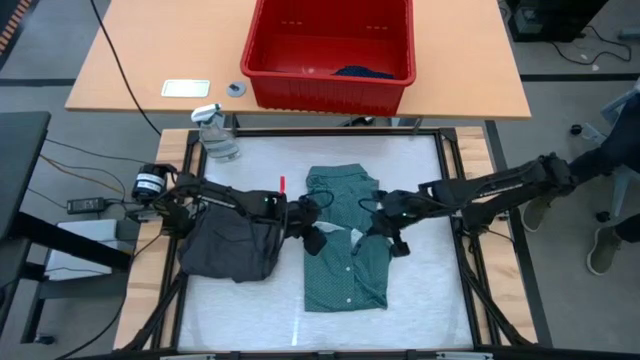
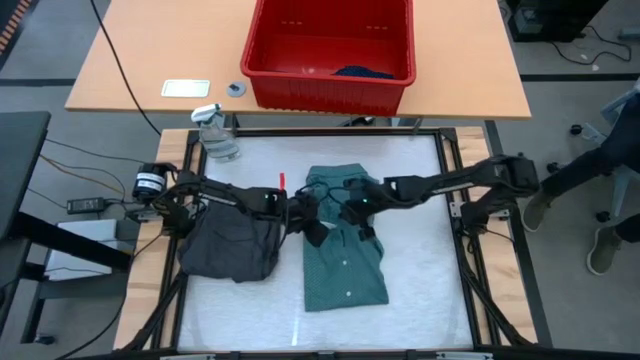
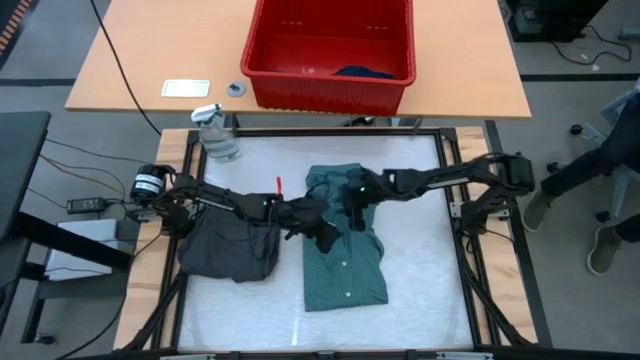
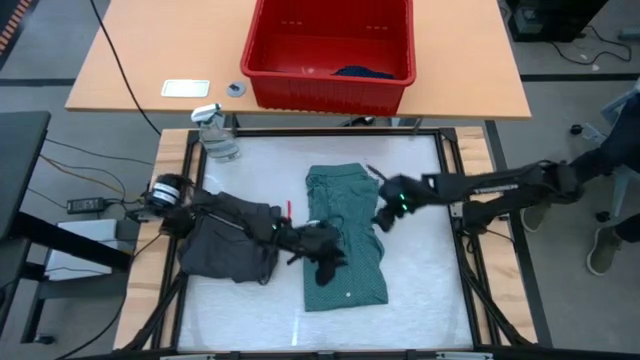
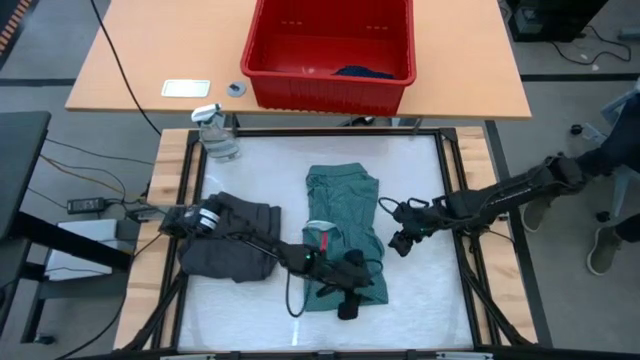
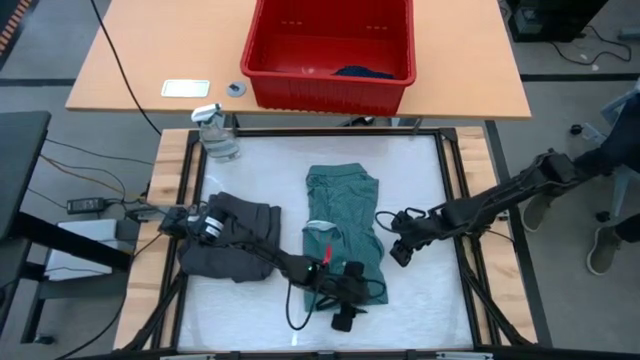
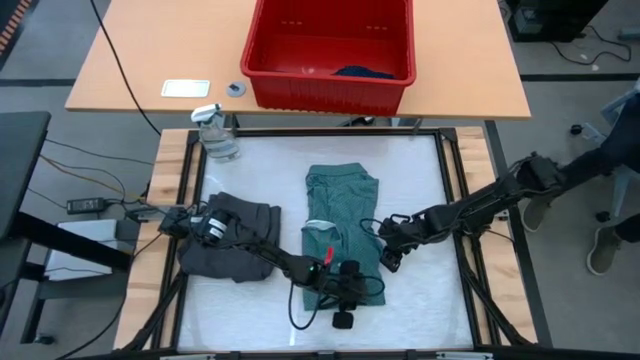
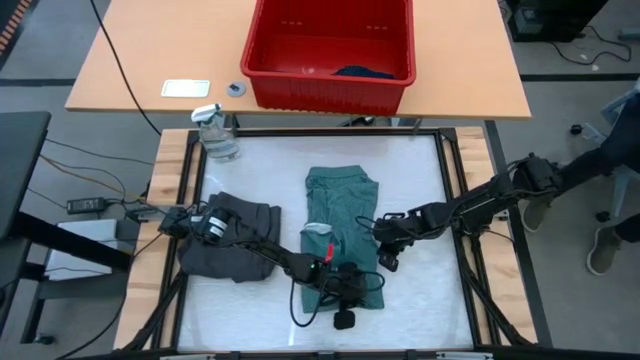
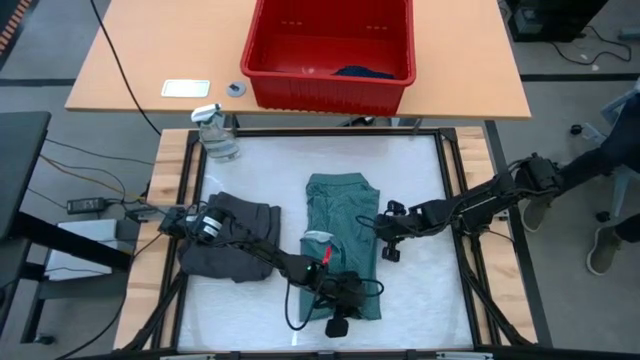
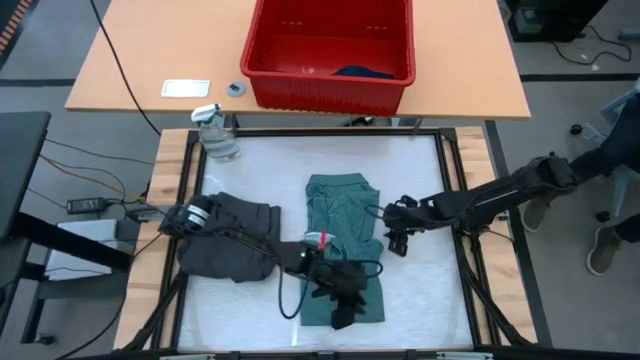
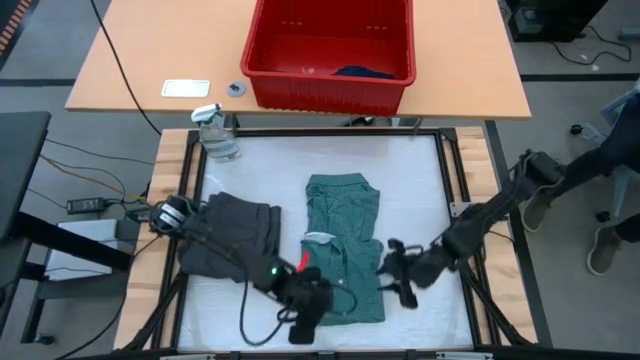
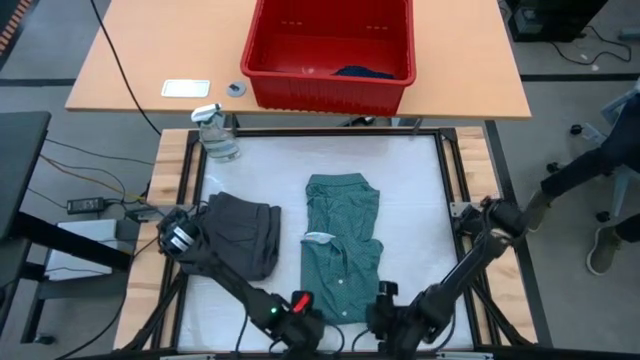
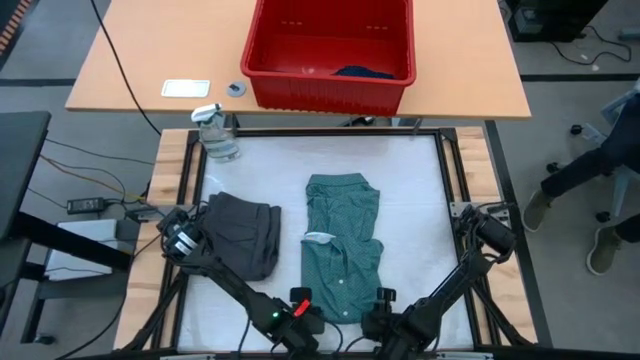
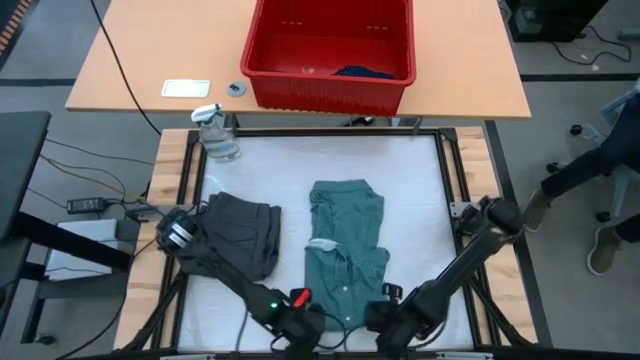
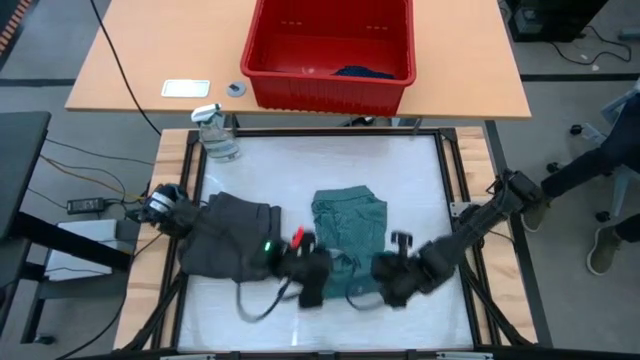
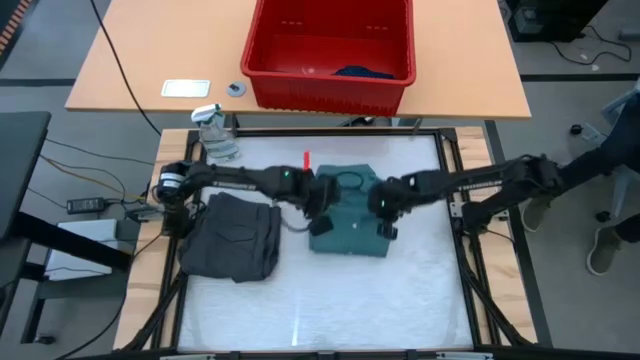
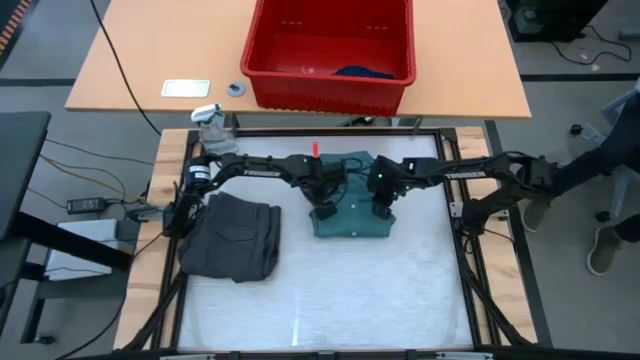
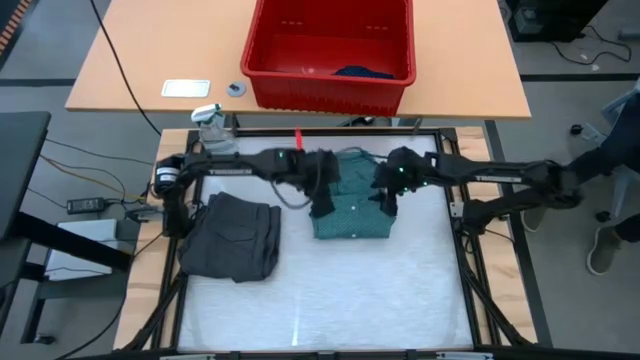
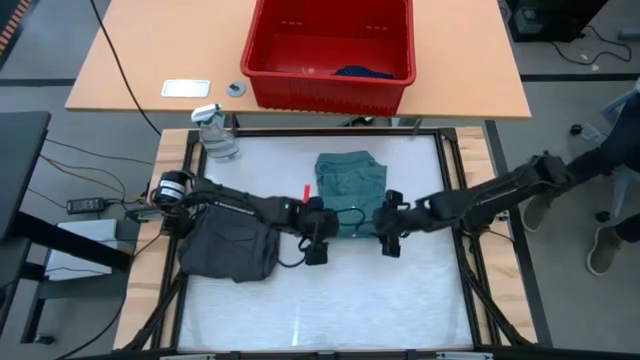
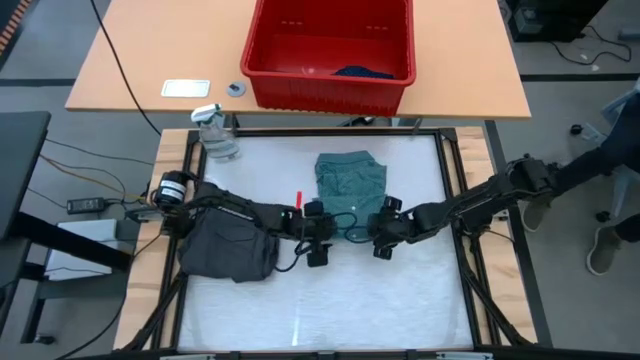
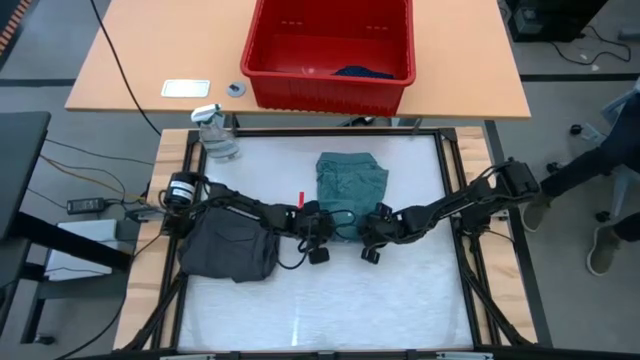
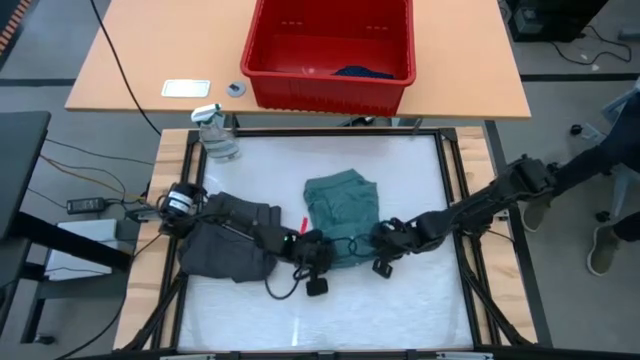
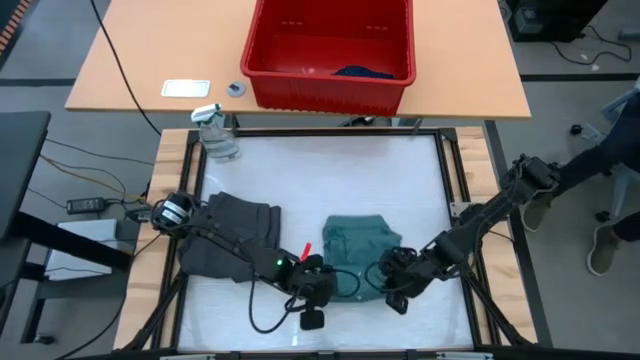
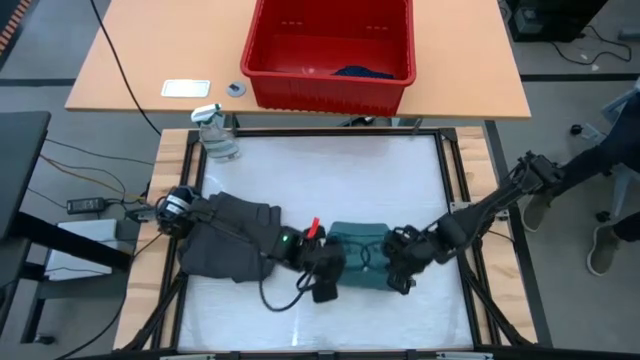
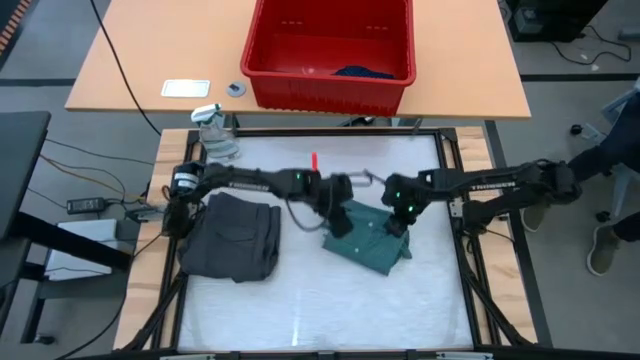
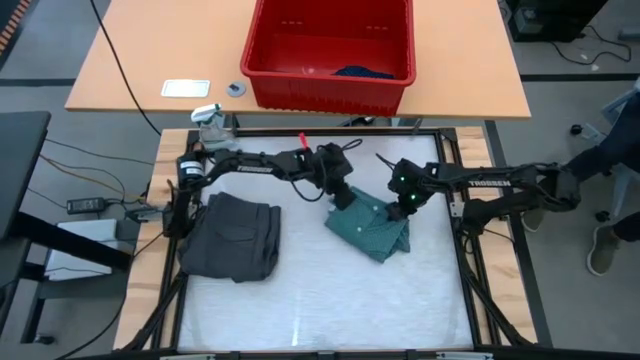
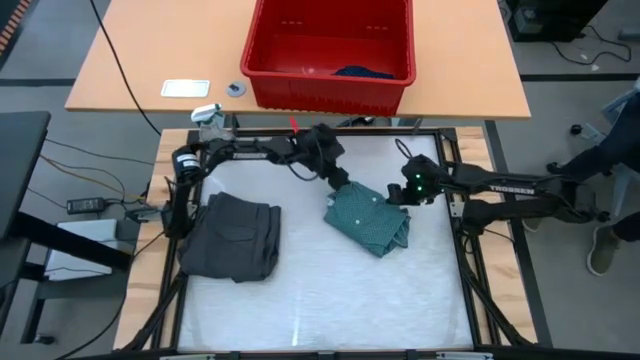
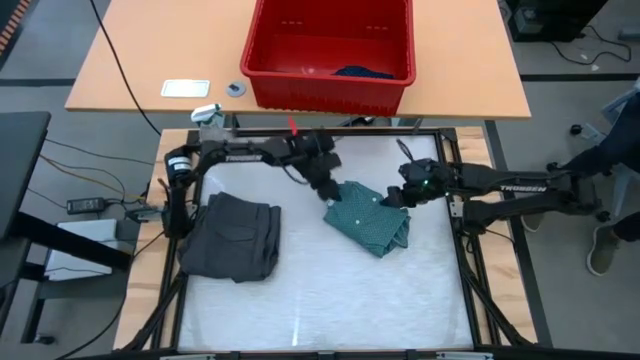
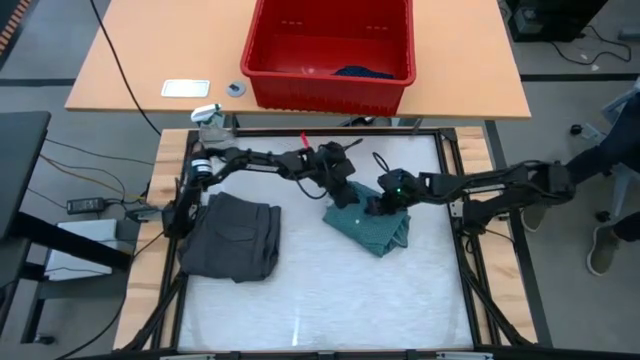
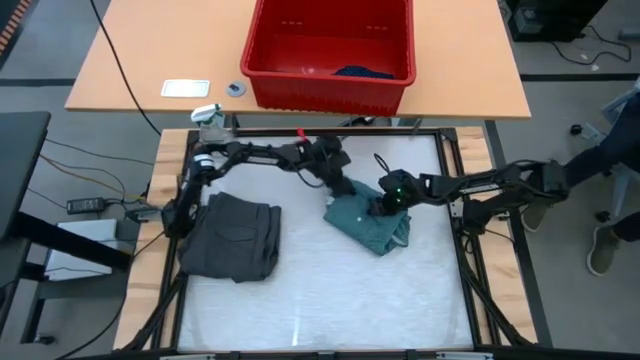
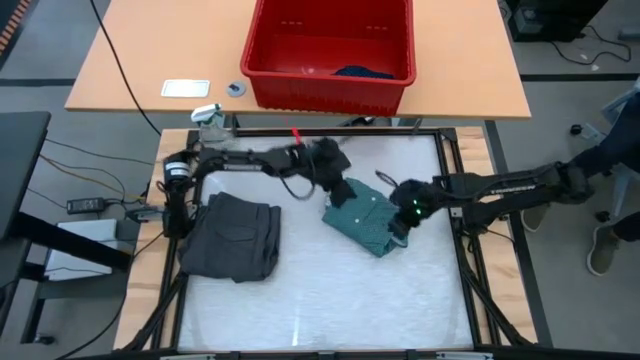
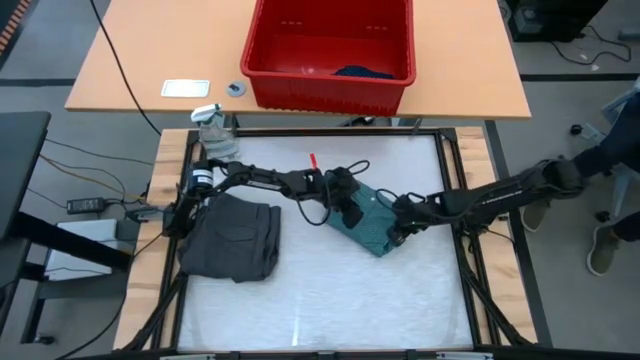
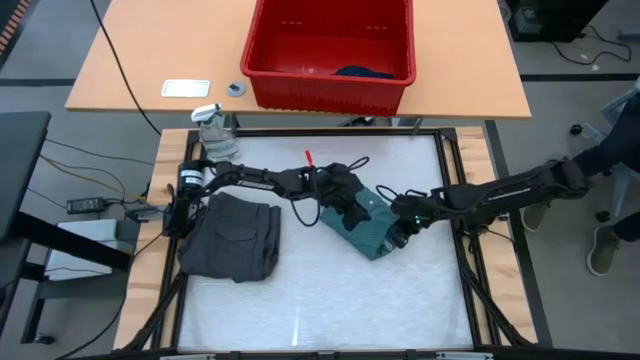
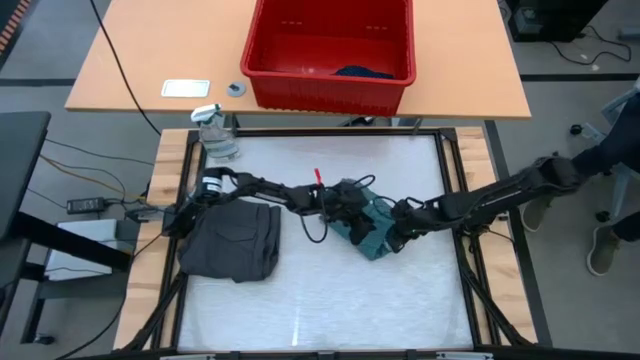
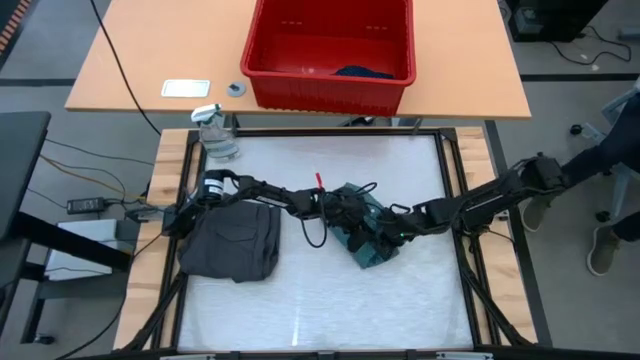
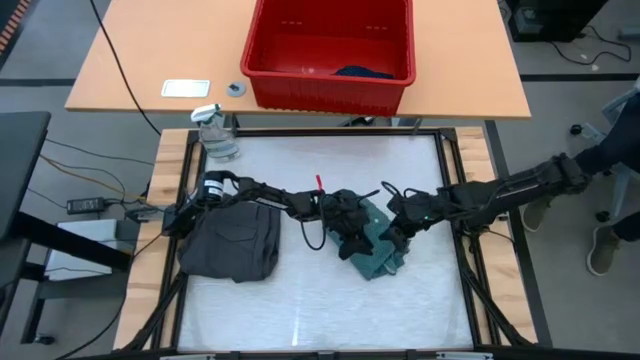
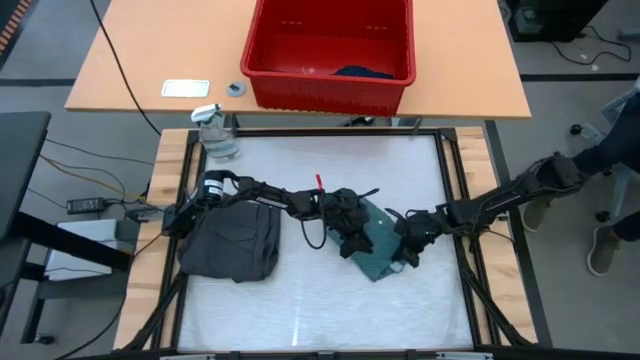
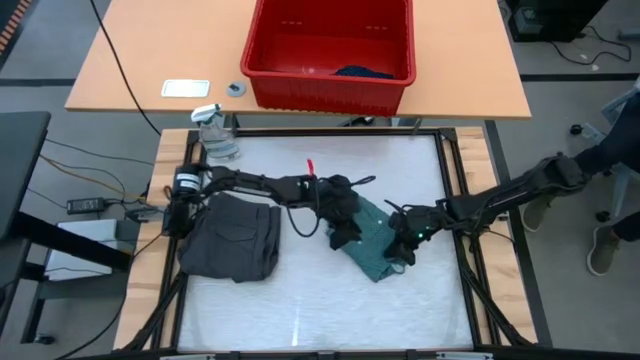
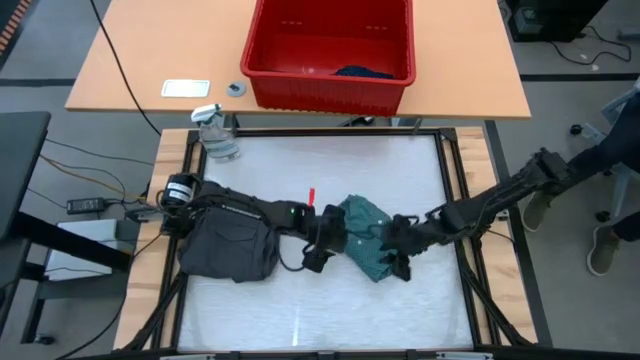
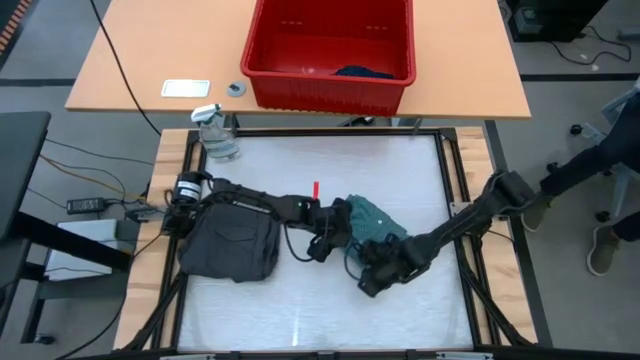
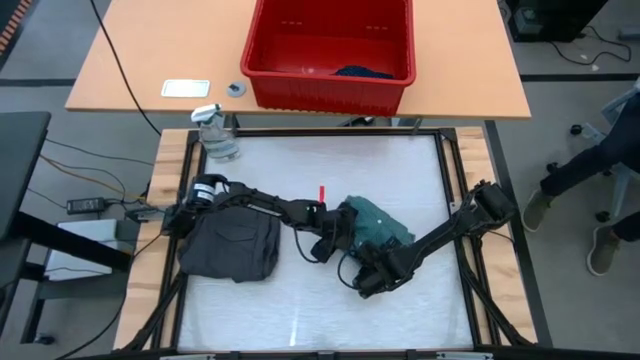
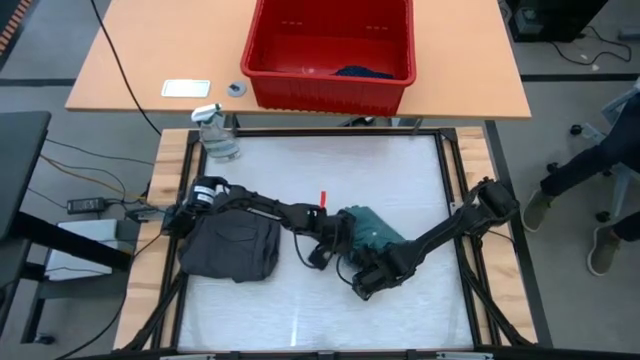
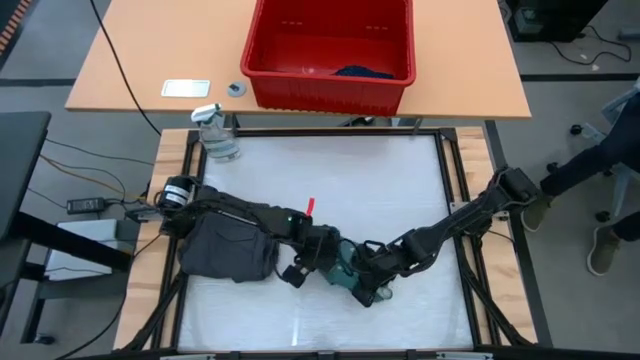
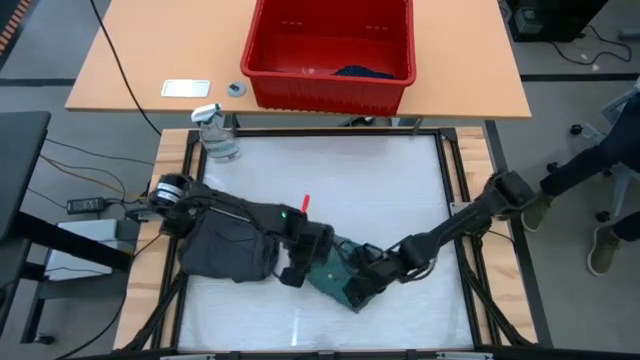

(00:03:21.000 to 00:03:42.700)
Task: Fold Laundry from Bin
Fold the green polo shirt on the table
